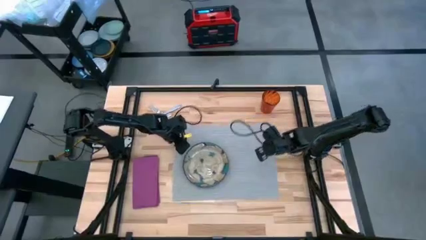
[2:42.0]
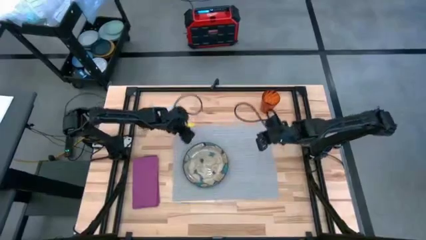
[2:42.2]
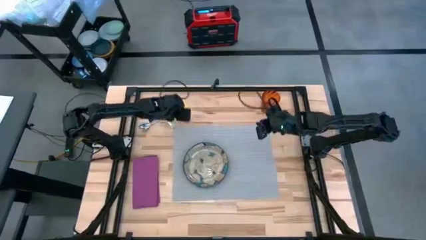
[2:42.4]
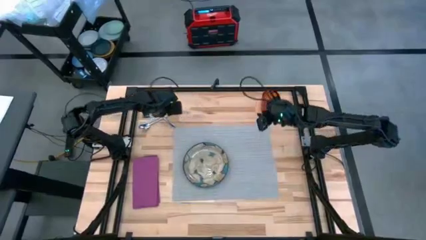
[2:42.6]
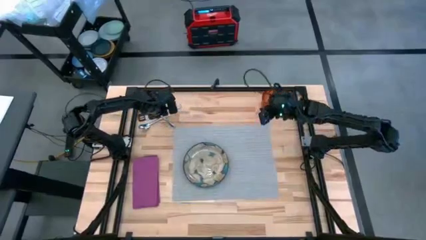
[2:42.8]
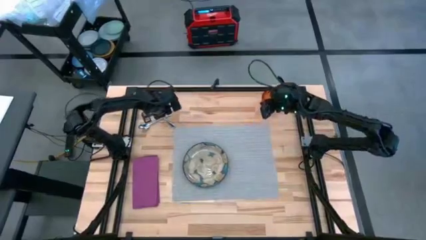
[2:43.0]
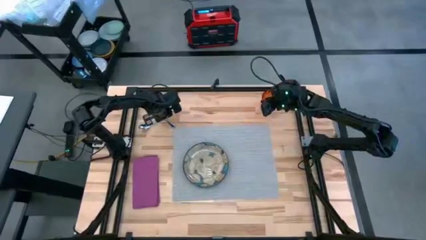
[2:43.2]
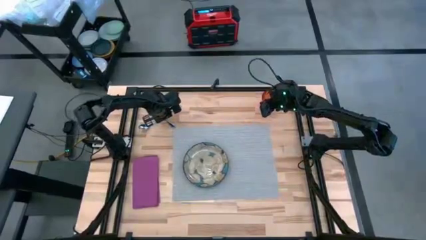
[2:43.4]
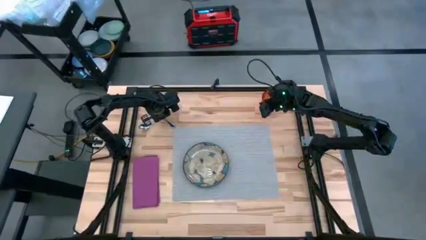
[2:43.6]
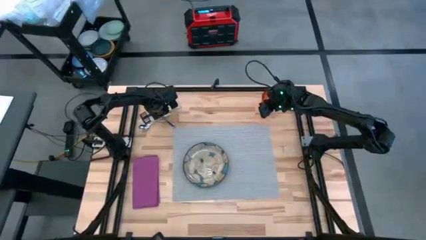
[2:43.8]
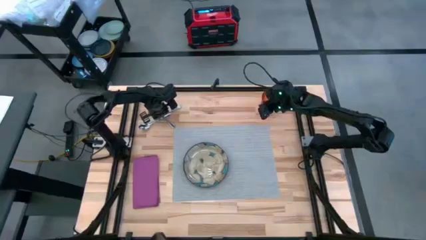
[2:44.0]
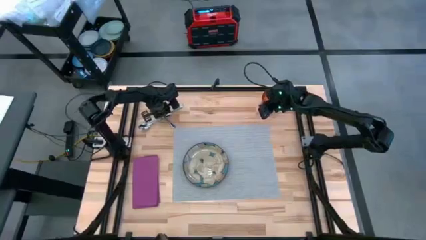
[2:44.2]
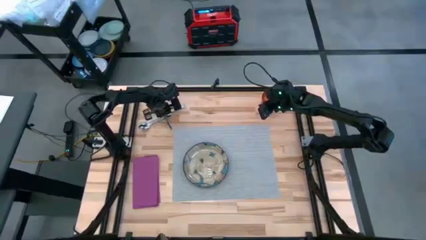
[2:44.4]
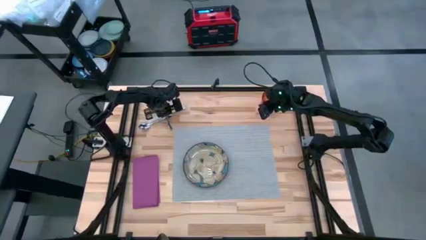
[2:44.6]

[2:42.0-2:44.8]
Task: Set table place
Put the silver fork on top of the purple napkin

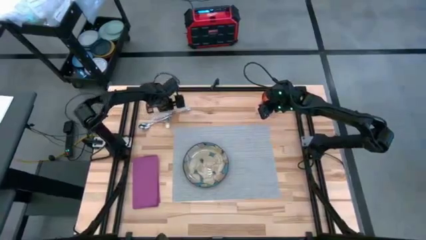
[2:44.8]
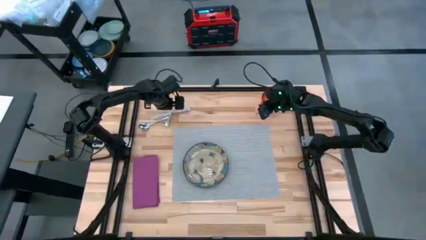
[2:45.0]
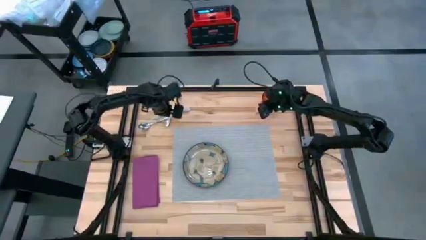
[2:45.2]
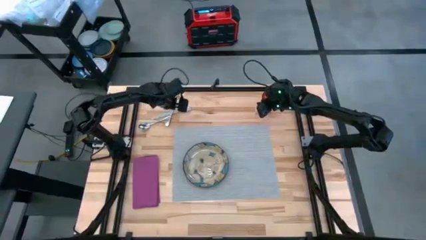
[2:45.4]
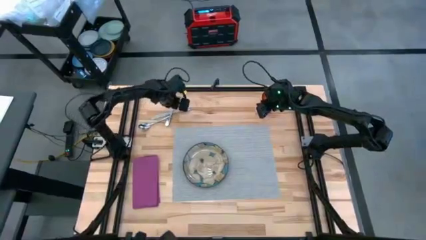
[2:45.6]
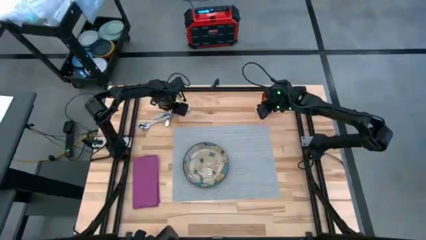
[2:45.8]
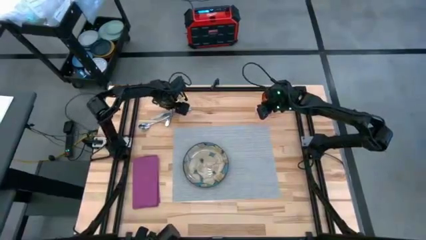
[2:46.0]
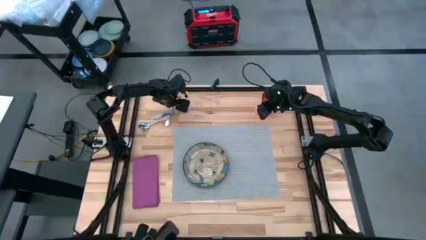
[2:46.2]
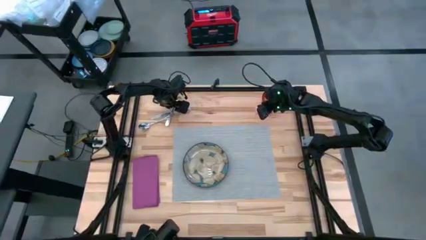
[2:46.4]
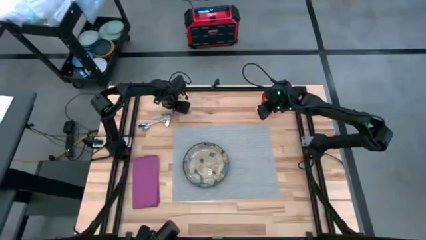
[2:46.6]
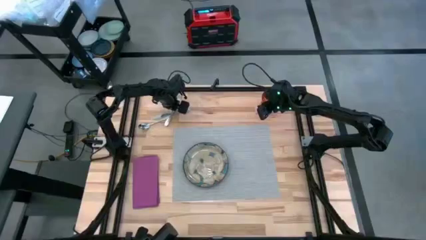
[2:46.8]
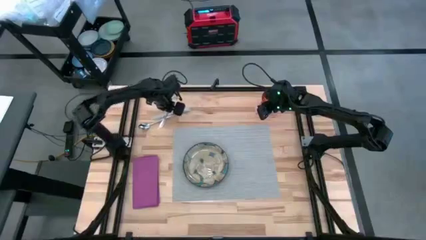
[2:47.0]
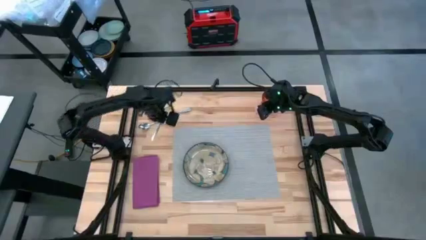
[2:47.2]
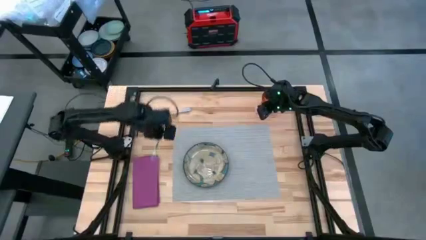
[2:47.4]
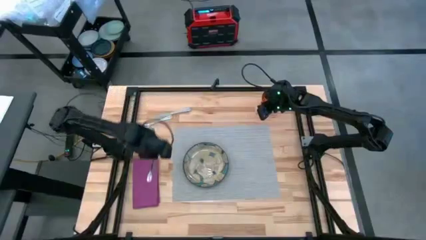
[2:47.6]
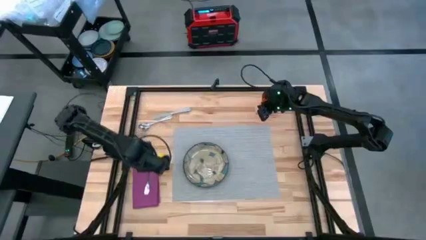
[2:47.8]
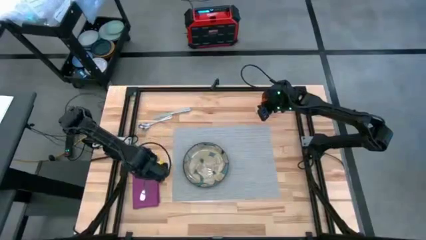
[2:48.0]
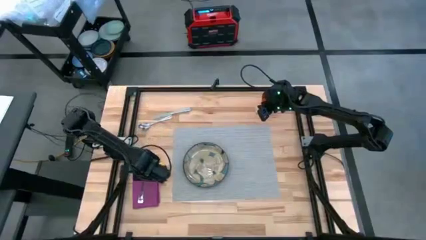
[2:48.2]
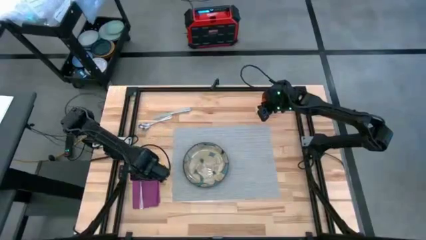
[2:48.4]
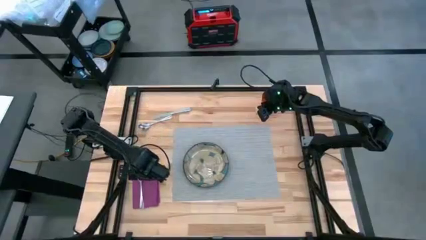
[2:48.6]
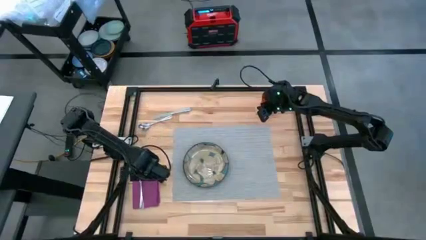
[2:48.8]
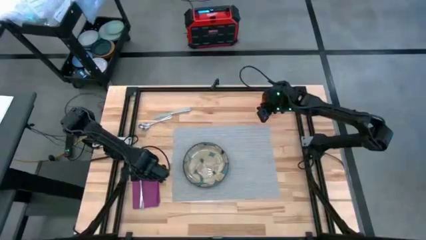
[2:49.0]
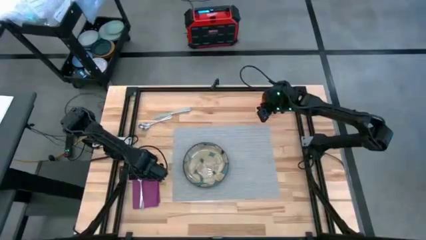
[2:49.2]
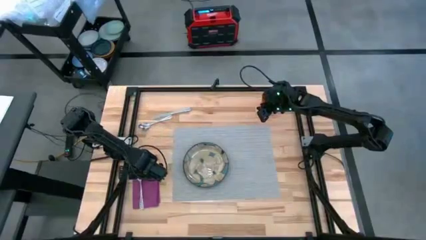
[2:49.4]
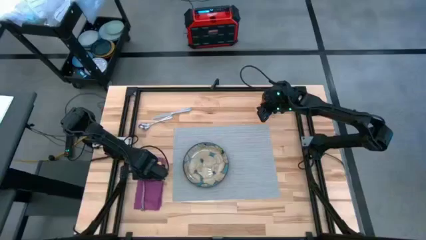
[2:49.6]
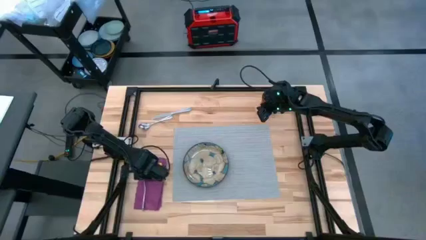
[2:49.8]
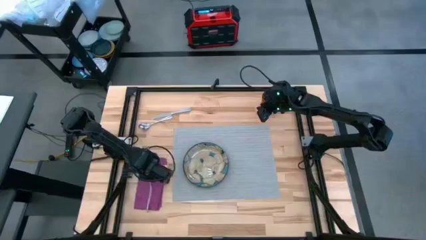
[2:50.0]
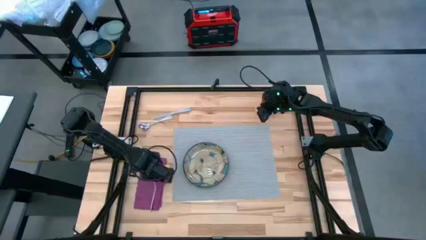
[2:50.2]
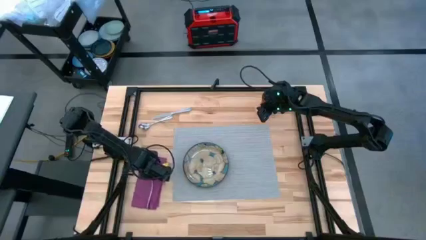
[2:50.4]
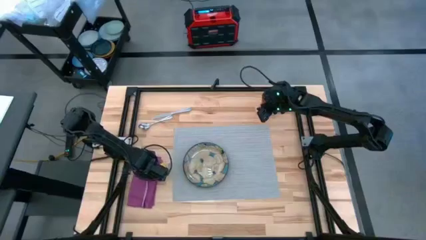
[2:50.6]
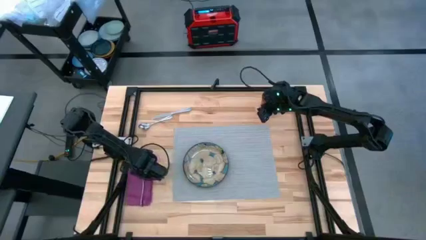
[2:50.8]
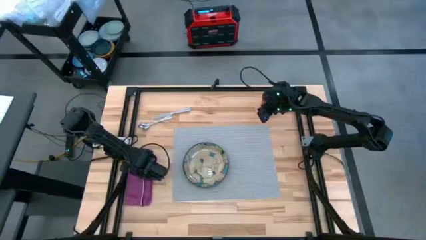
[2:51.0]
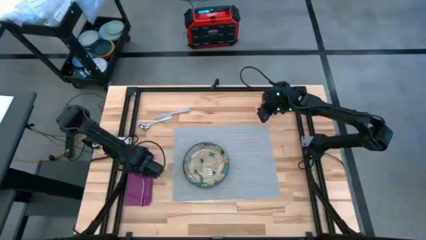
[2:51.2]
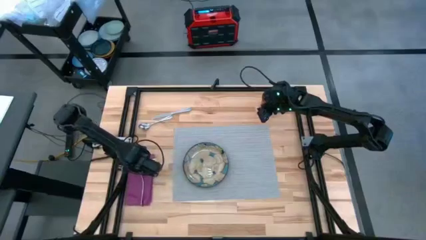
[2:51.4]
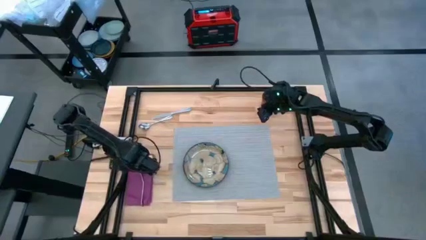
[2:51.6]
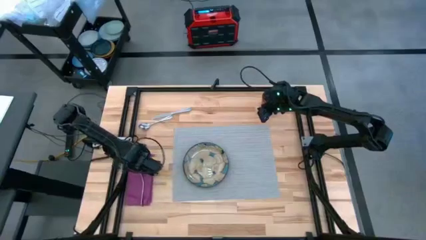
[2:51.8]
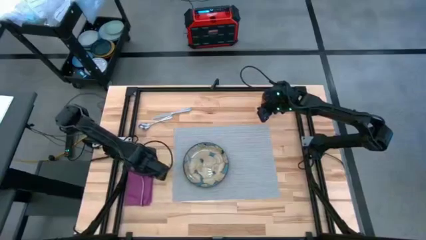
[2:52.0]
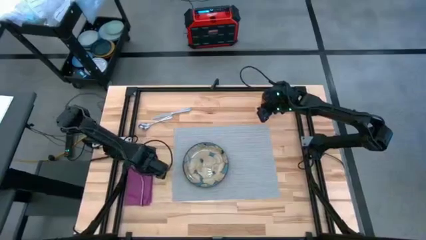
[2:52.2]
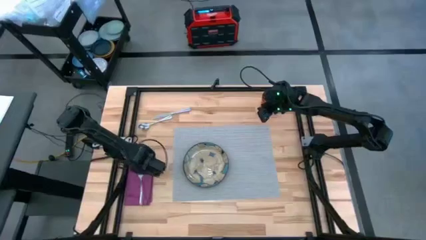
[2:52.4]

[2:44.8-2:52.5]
Put the silver fork on top of the purple napkin
